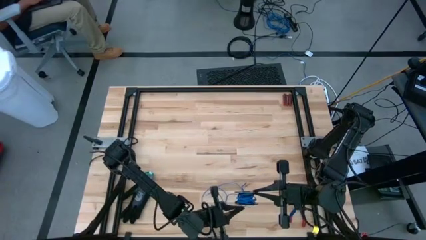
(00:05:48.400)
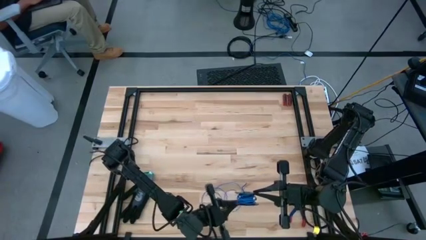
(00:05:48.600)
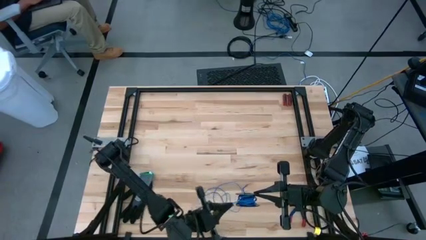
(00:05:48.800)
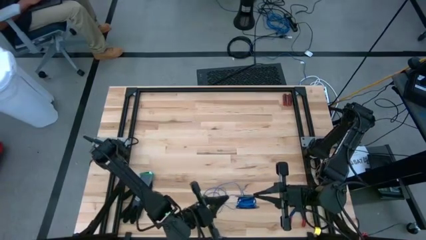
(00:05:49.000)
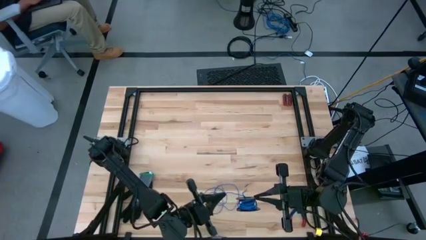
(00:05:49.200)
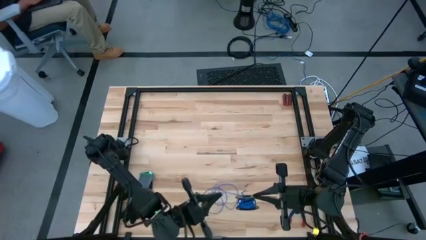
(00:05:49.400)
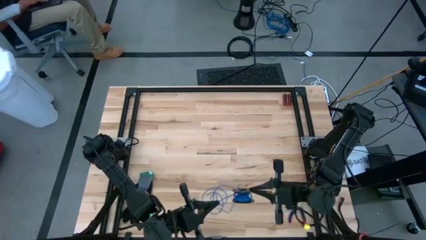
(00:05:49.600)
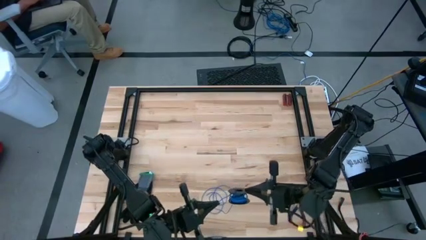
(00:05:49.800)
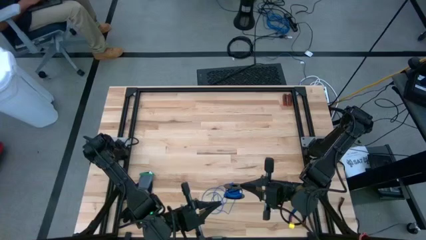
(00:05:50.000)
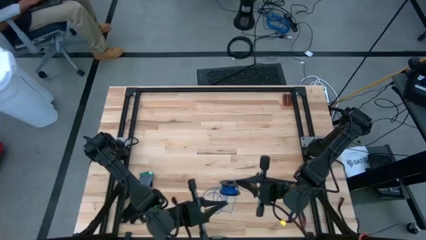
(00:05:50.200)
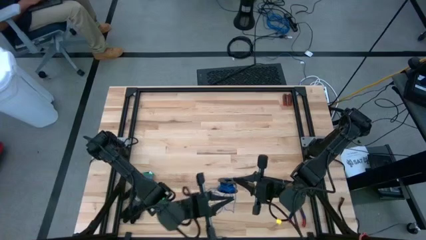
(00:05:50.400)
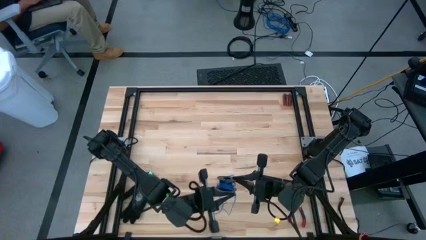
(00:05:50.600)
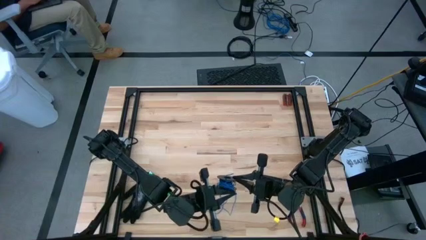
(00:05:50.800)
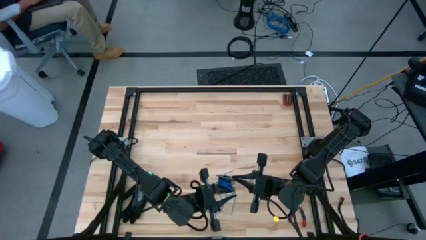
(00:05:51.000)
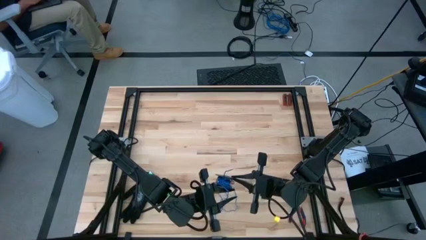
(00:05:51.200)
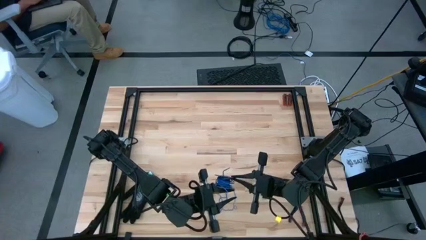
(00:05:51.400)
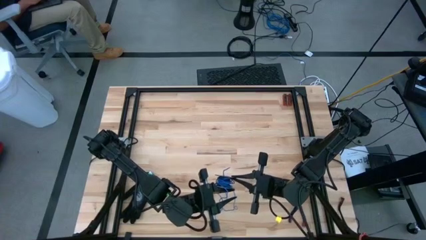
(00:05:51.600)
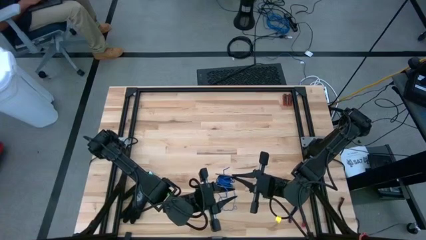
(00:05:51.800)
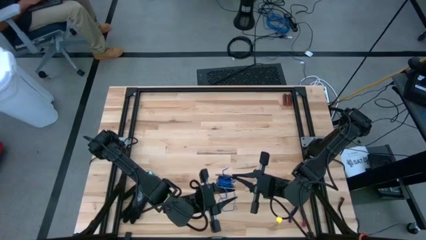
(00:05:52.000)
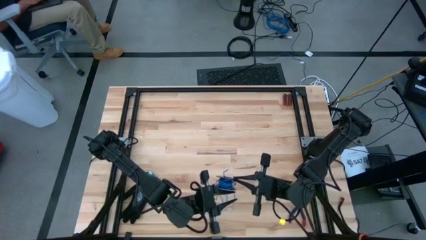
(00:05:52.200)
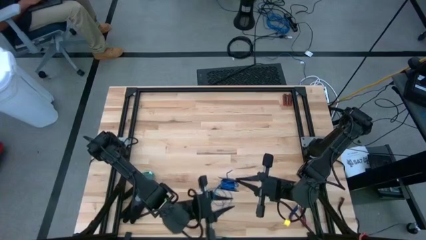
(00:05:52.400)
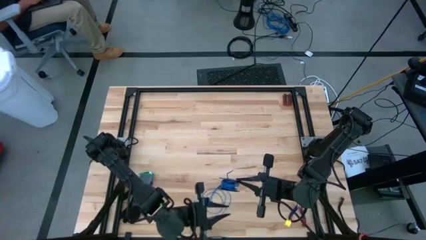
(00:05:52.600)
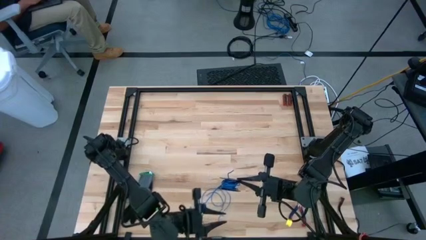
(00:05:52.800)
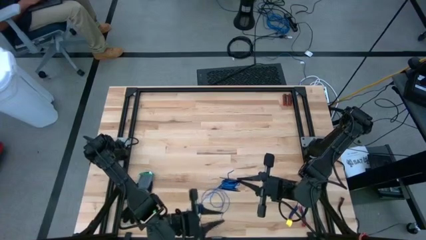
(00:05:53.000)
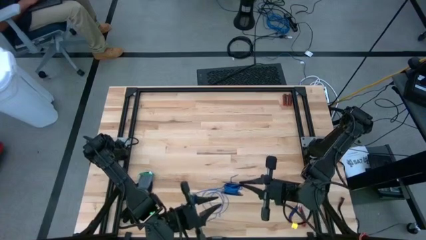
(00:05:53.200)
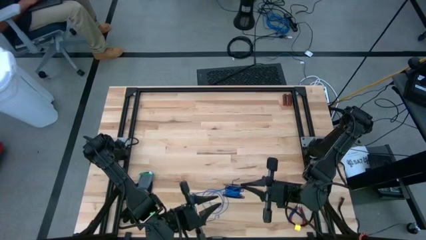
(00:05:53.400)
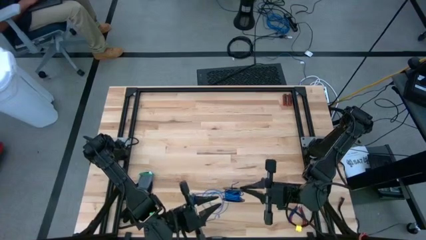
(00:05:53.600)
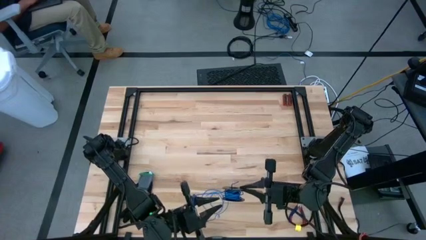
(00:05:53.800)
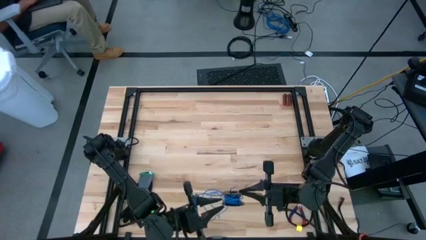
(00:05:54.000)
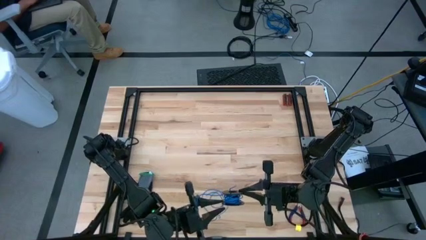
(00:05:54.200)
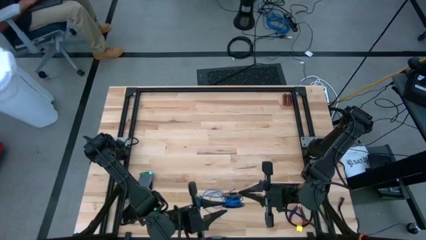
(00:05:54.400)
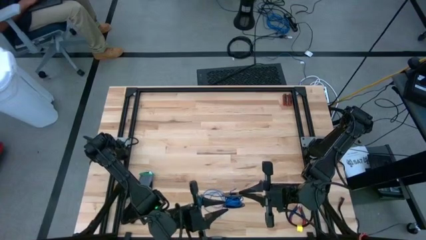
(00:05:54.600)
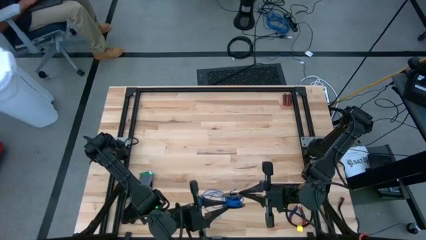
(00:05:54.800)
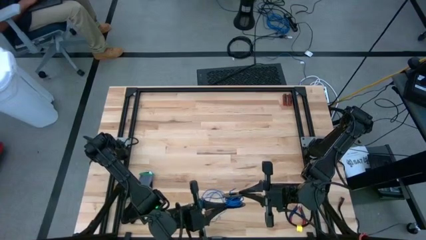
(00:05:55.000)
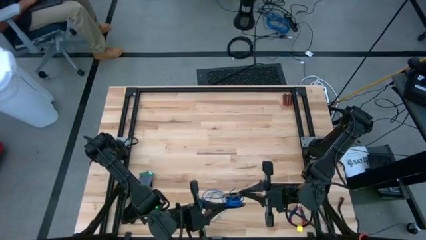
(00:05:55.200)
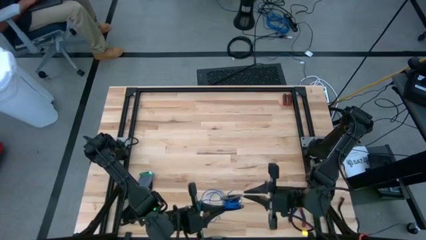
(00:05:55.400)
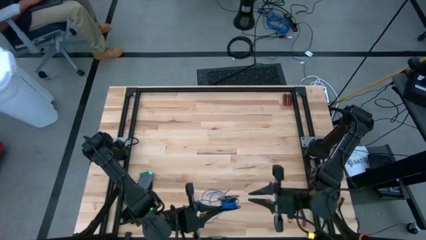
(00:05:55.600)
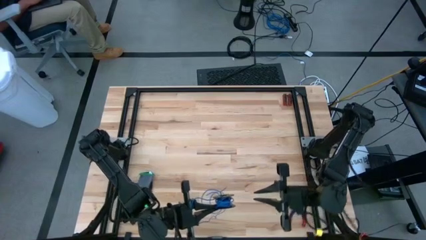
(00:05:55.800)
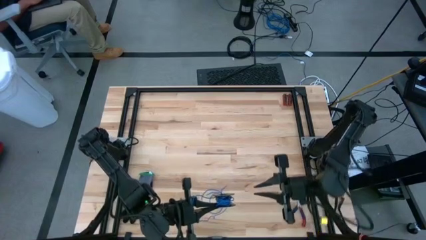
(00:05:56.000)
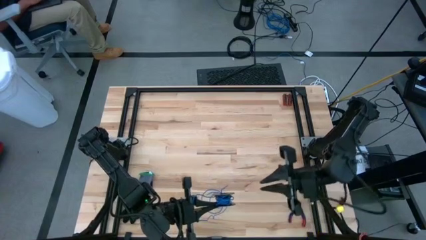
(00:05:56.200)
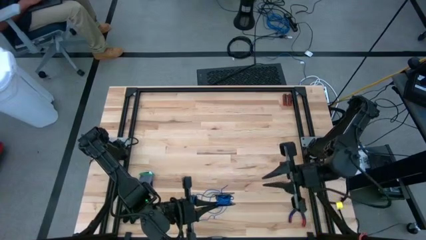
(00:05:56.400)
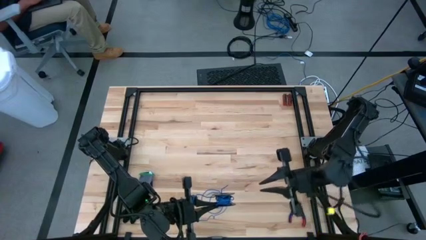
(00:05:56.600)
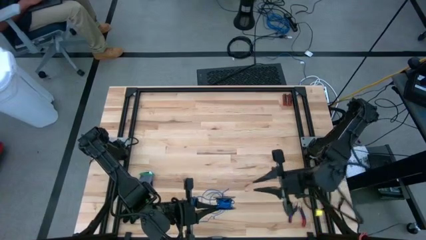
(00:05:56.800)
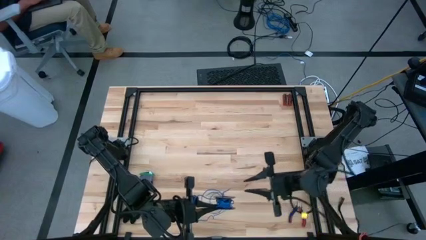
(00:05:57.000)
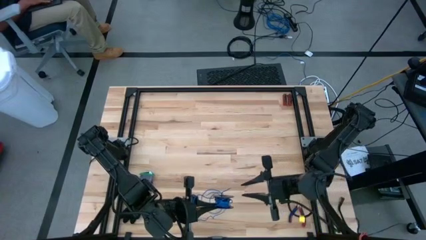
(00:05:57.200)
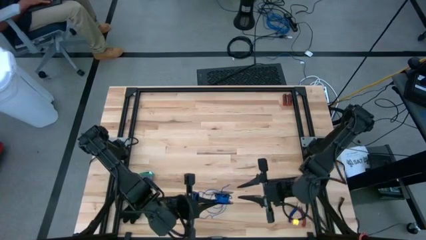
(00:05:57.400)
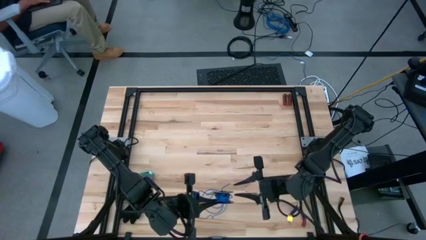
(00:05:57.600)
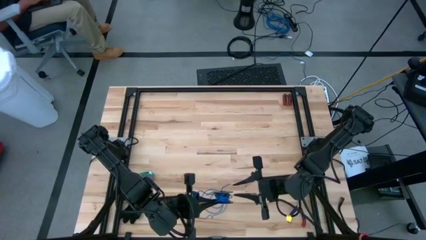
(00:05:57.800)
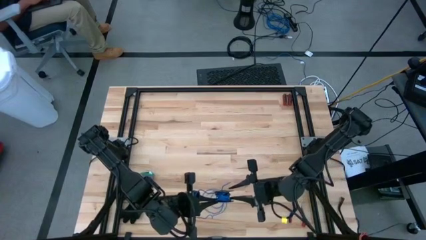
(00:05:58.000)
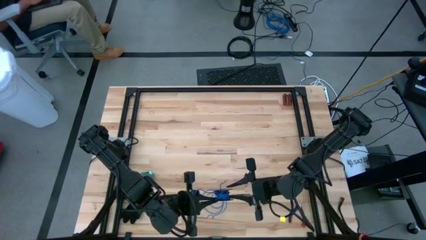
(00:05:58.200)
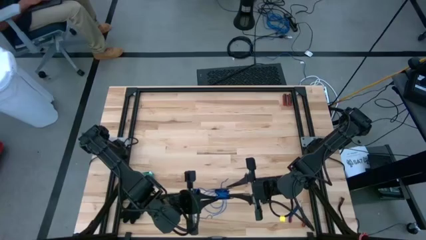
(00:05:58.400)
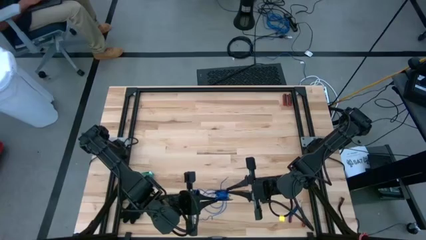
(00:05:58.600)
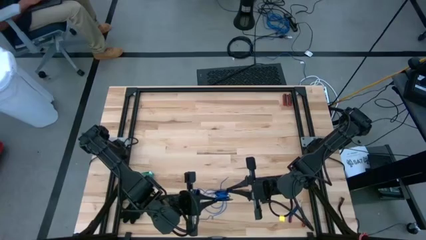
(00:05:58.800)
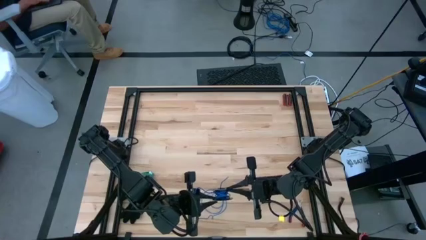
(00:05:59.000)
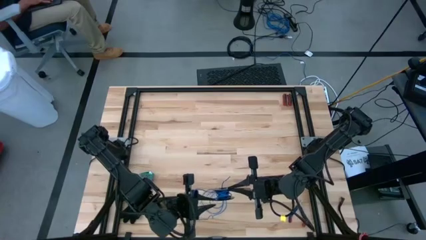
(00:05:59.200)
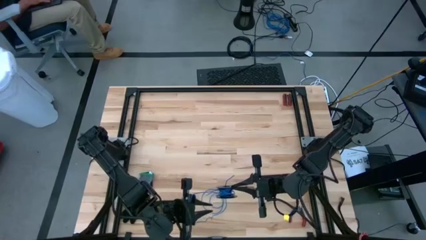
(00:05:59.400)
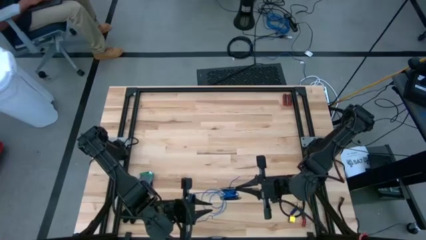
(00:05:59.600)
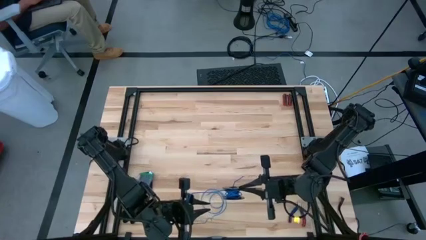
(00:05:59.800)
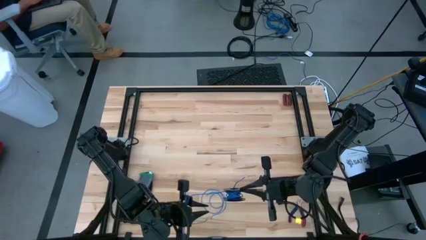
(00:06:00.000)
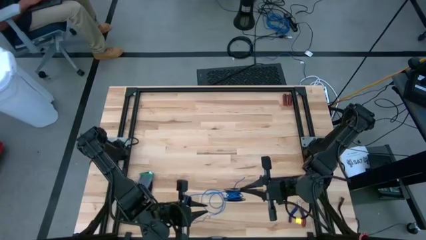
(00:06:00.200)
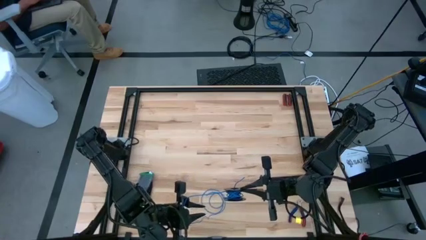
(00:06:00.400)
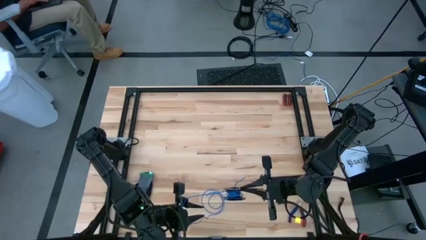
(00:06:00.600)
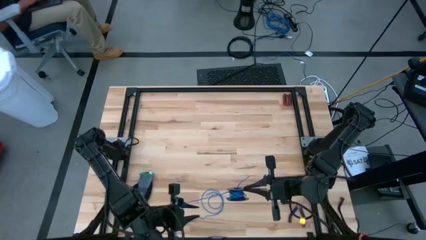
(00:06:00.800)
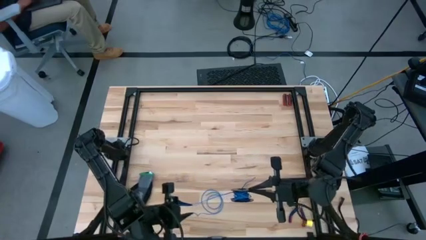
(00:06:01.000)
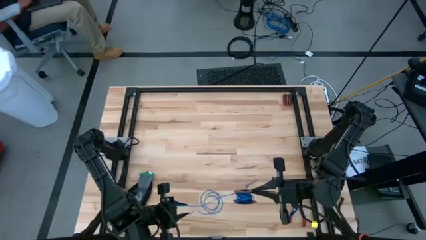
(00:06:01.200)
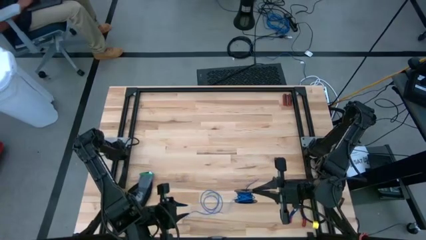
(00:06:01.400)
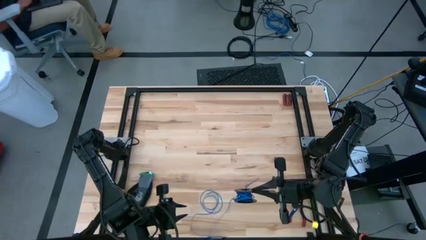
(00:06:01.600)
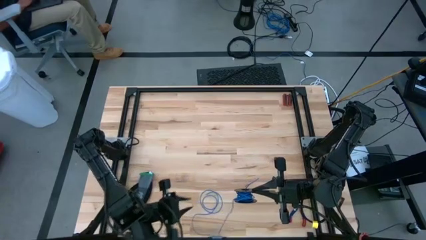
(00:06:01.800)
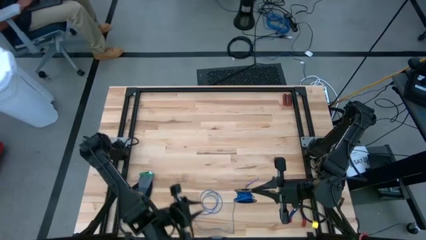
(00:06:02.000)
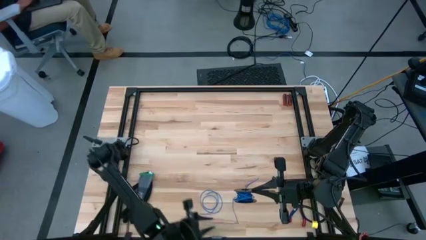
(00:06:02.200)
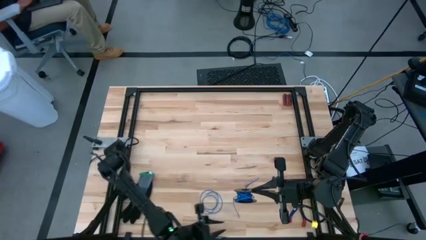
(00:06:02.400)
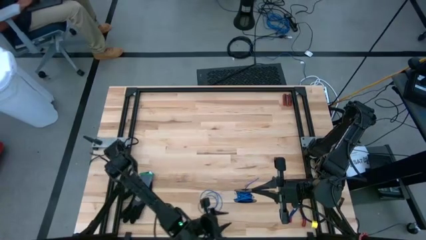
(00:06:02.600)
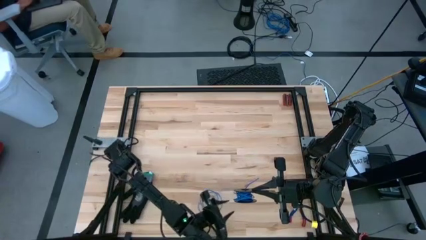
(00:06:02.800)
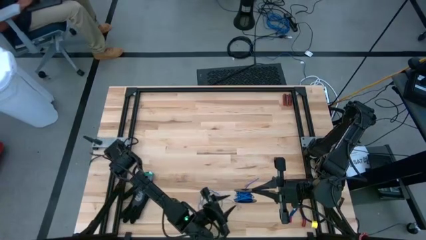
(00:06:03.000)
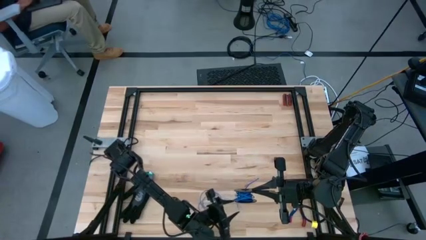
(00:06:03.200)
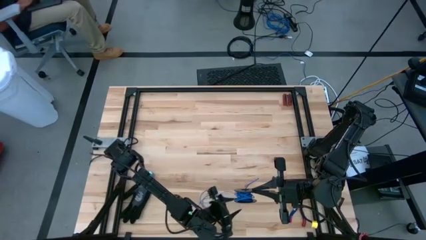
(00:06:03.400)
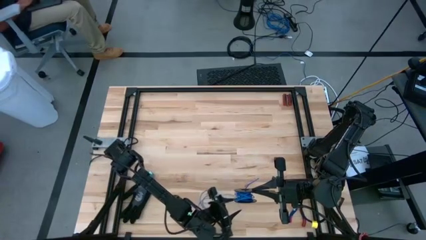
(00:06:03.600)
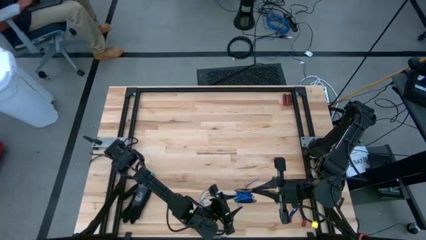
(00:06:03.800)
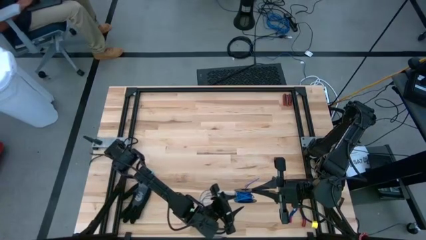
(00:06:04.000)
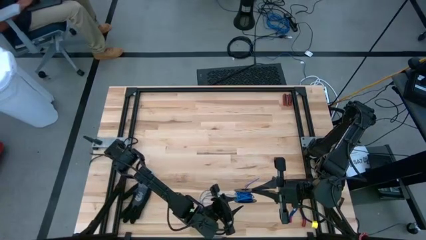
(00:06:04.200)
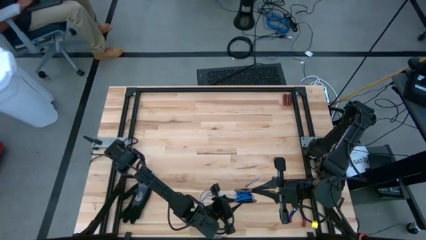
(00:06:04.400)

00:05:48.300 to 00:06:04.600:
Task: Coil cords
Coil the blue wire onto the spool
